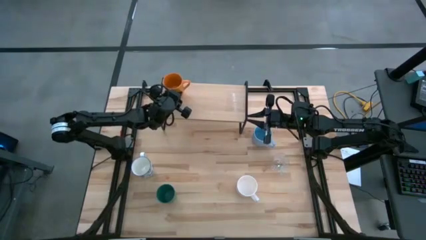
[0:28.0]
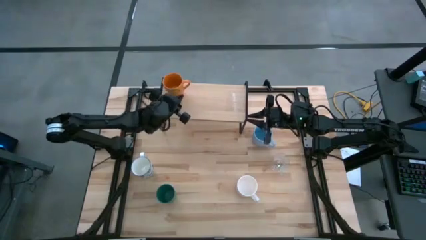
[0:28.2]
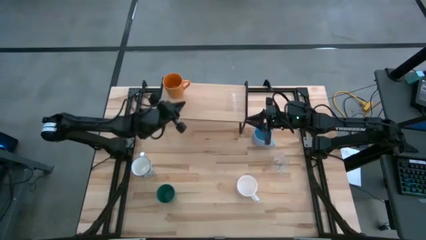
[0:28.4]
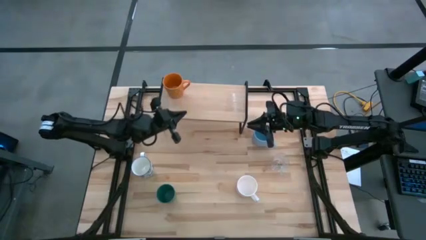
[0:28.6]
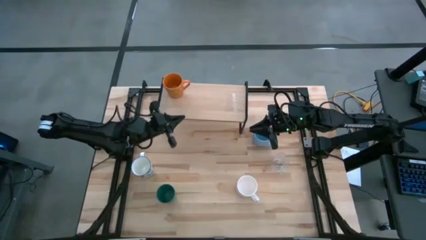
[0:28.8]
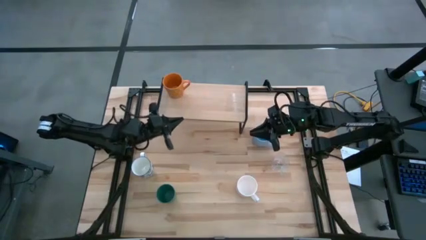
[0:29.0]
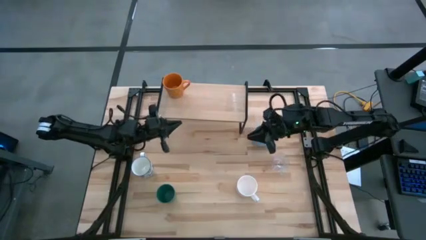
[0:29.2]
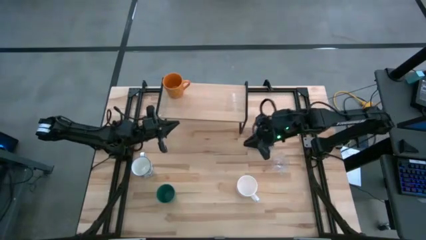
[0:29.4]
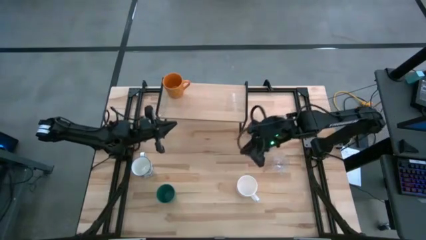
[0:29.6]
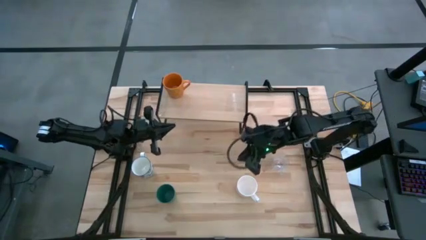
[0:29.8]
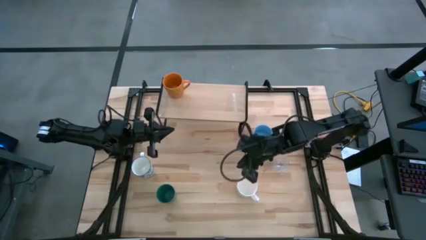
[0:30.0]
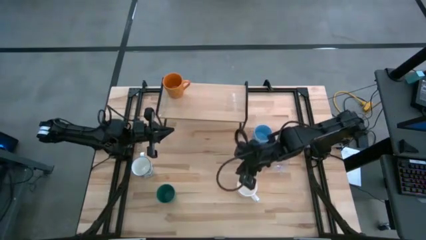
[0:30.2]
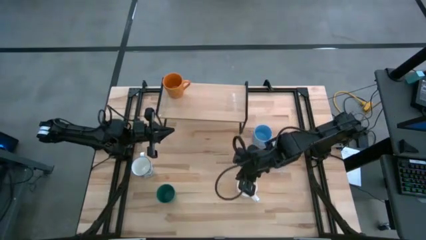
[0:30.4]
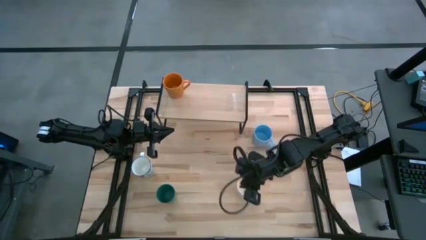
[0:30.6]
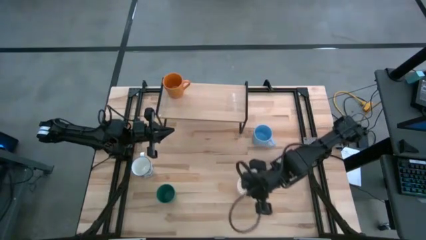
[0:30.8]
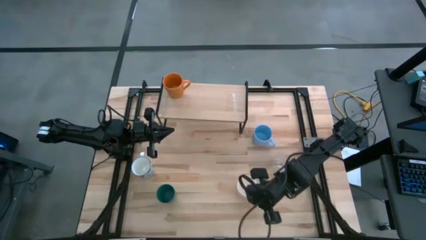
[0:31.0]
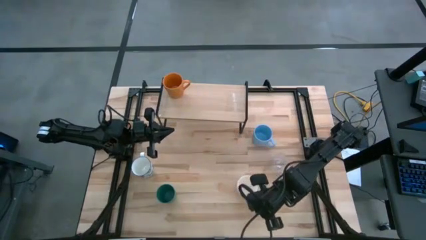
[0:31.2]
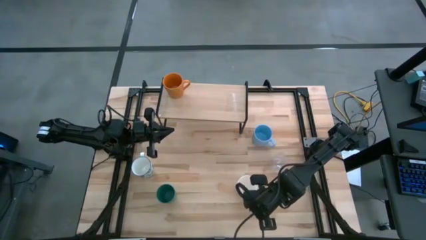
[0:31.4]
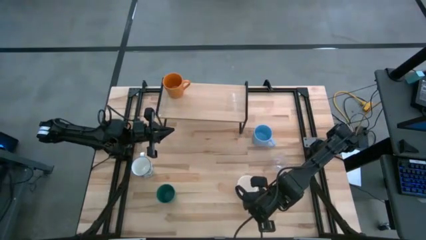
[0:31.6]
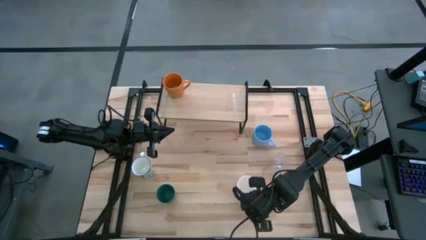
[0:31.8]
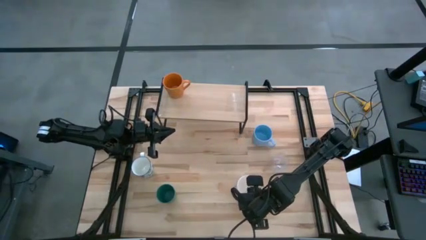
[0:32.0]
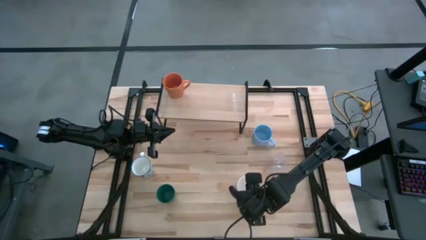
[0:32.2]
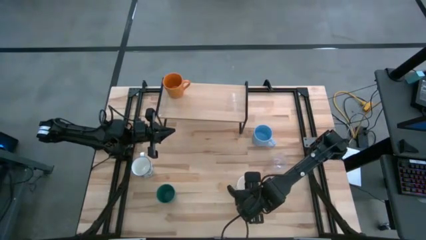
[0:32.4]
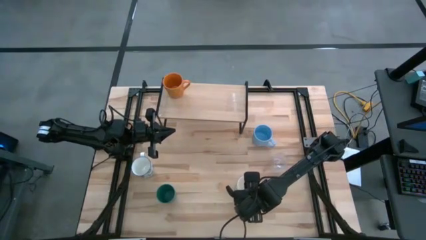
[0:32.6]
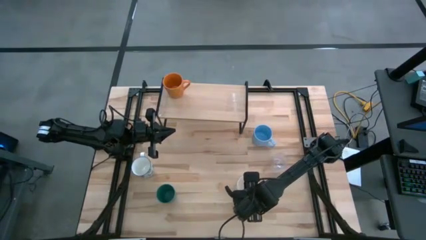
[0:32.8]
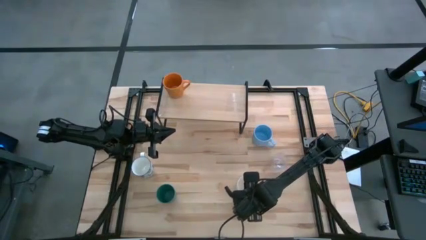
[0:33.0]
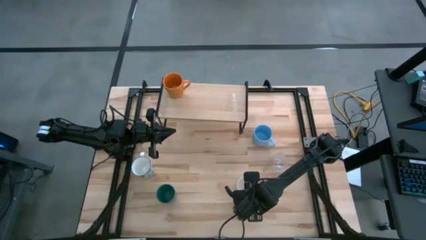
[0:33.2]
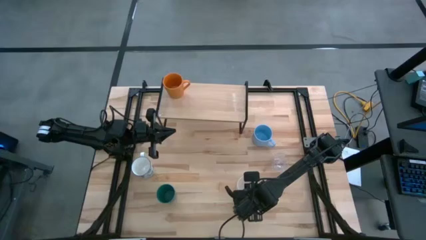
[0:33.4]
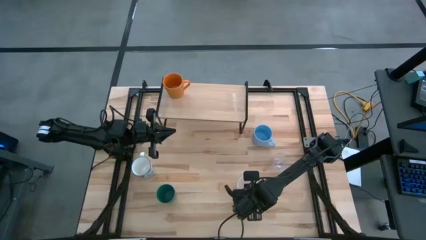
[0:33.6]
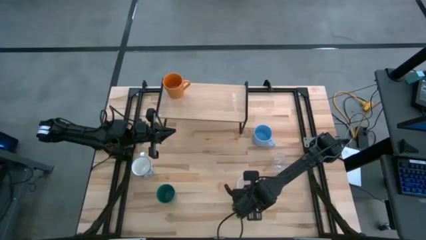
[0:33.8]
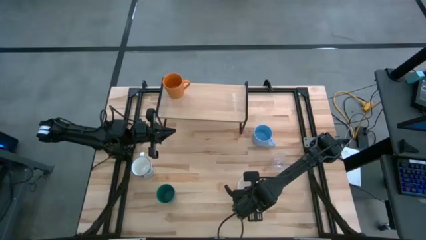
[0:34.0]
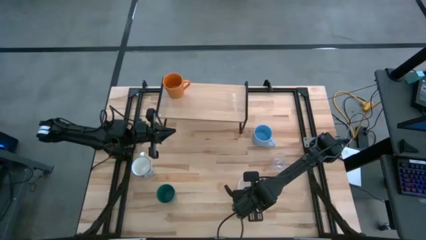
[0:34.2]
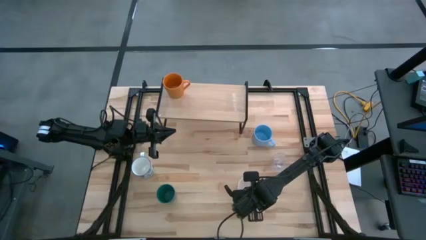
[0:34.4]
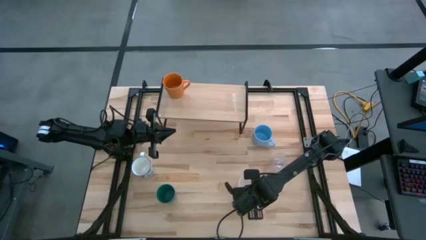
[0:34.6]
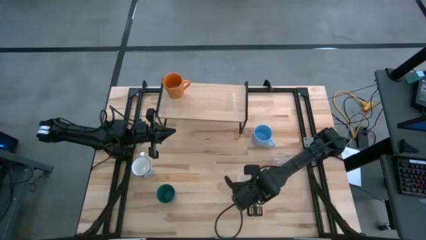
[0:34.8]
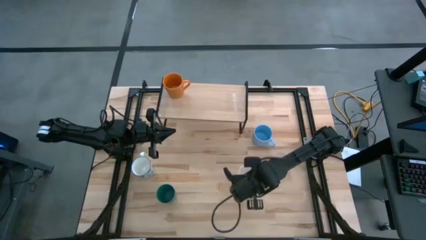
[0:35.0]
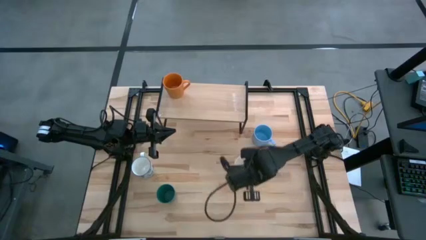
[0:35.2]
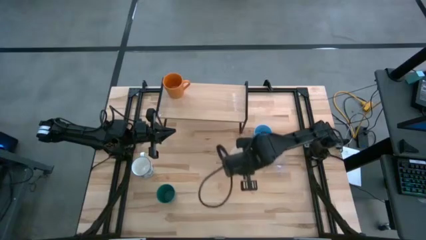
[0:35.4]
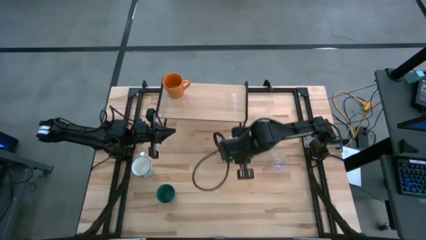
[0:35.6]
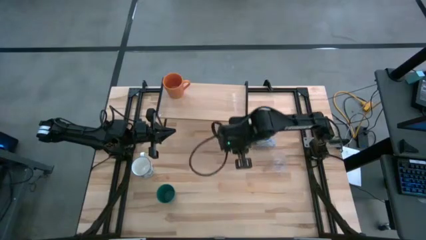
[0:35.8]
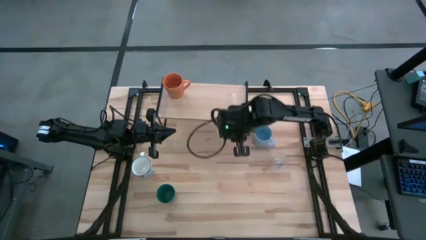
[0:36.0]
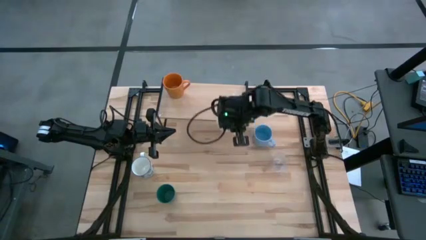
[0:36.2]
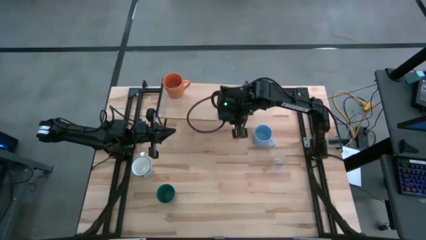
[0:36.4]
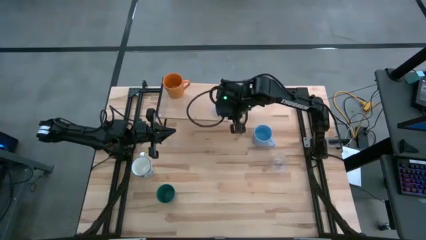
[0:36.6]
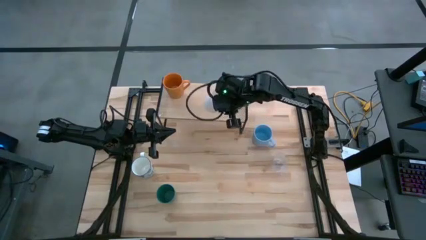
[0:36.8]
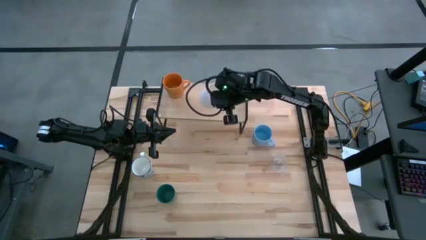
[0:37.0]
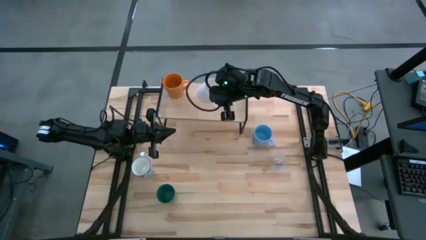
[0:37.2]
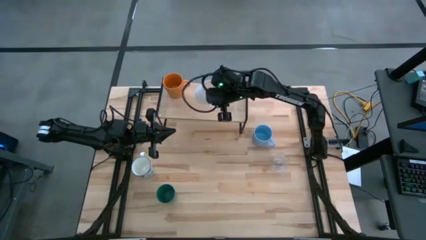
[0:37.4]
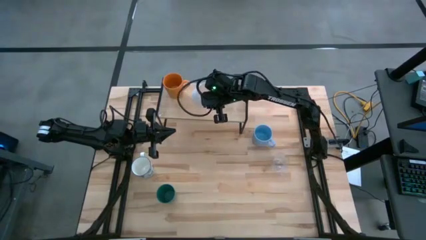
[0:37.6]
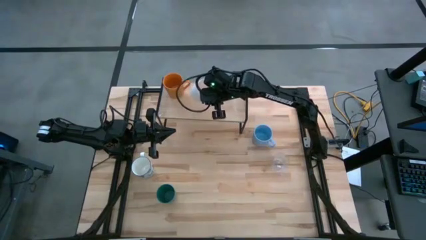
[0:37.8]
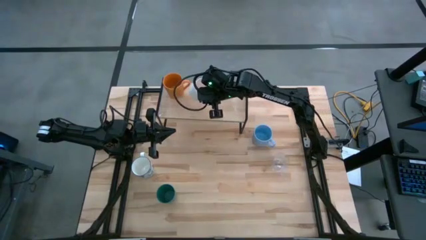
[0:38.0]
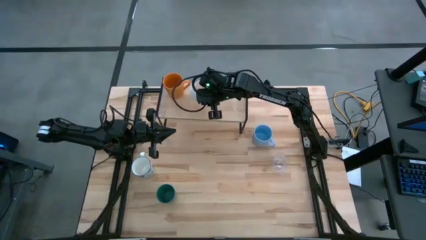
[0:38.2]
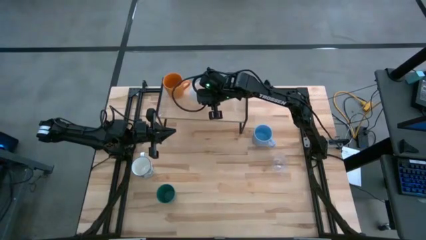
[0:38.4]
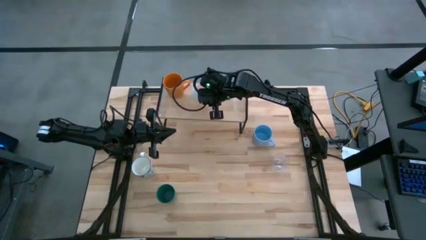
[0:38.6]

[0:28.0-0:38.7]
Task: Stack small to large cups/mugs on shelf
Put the white mug on the shelf
